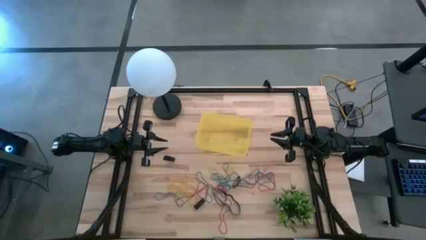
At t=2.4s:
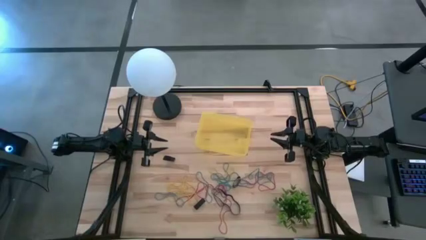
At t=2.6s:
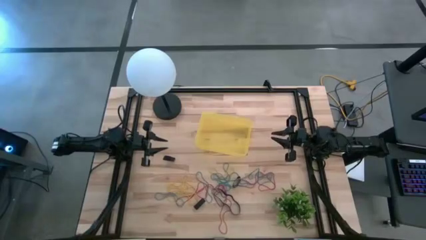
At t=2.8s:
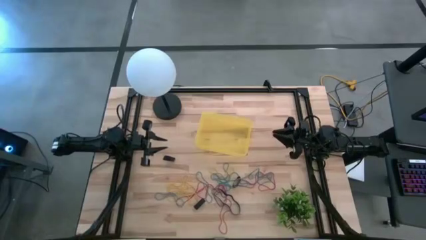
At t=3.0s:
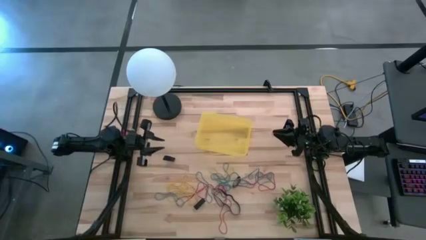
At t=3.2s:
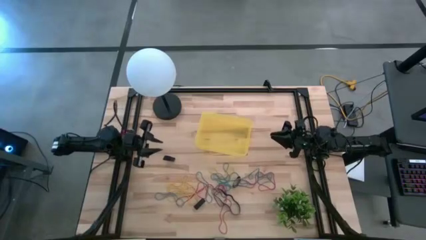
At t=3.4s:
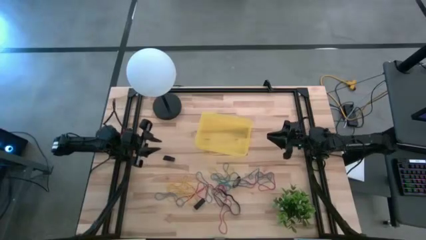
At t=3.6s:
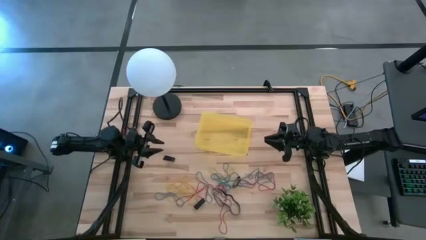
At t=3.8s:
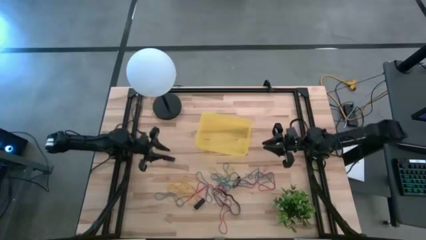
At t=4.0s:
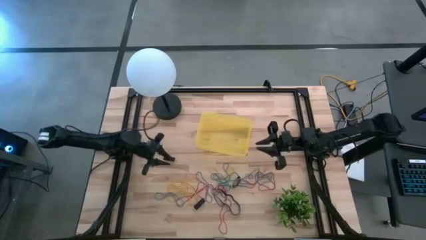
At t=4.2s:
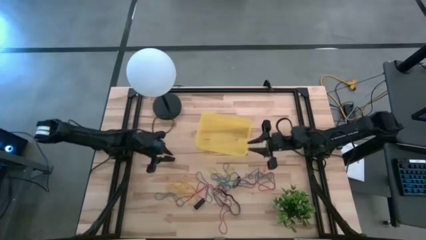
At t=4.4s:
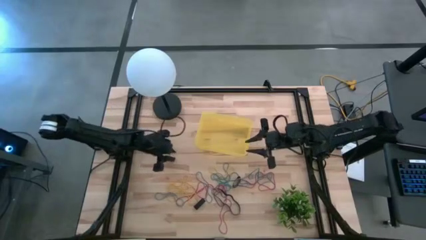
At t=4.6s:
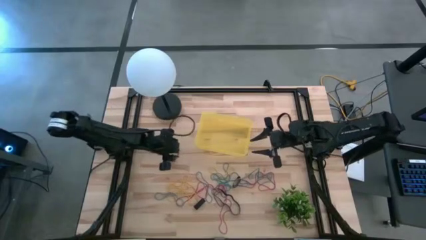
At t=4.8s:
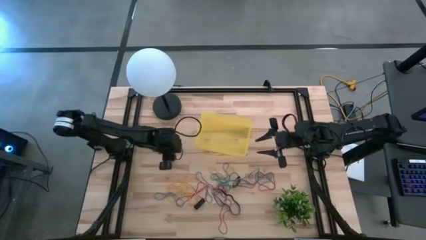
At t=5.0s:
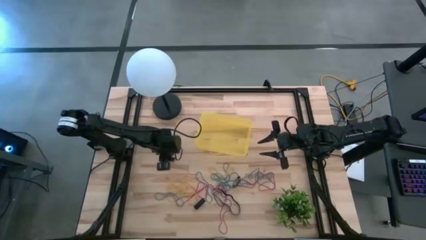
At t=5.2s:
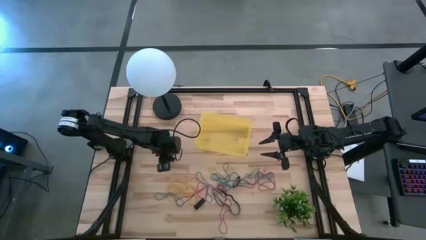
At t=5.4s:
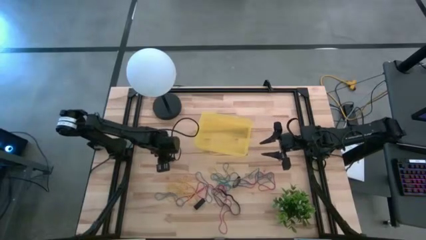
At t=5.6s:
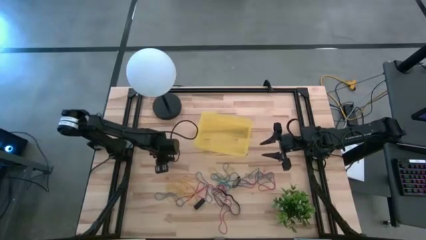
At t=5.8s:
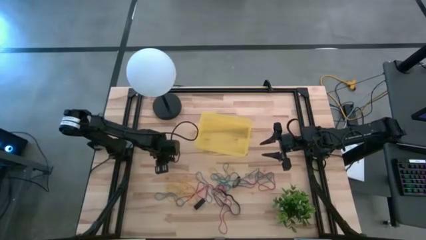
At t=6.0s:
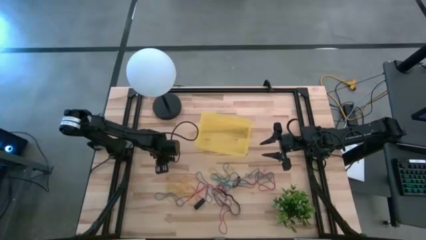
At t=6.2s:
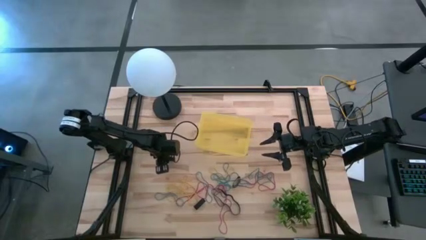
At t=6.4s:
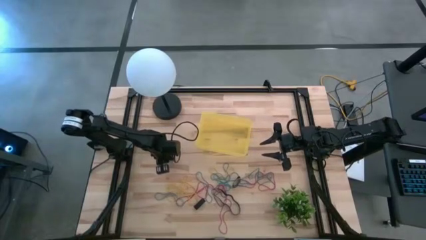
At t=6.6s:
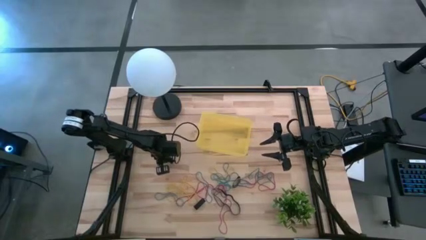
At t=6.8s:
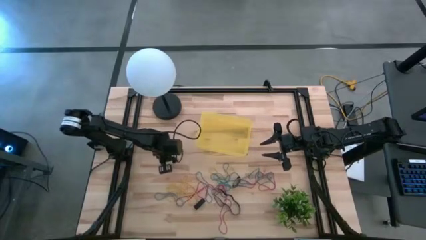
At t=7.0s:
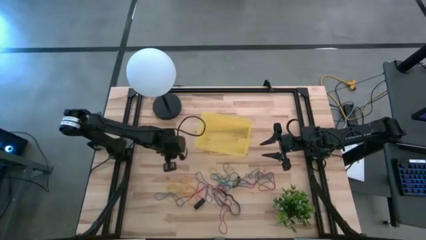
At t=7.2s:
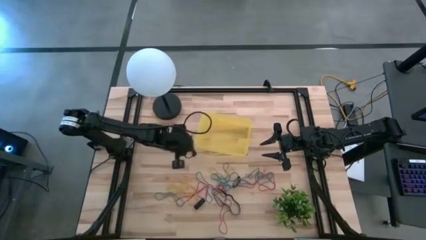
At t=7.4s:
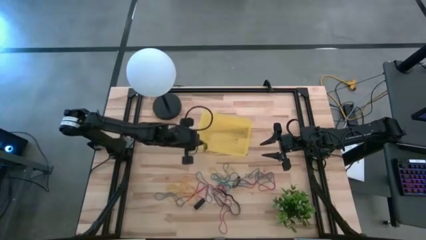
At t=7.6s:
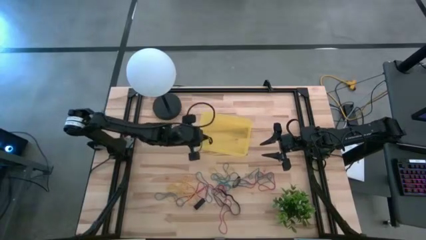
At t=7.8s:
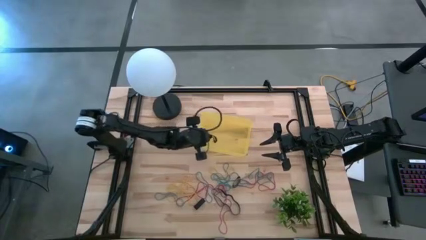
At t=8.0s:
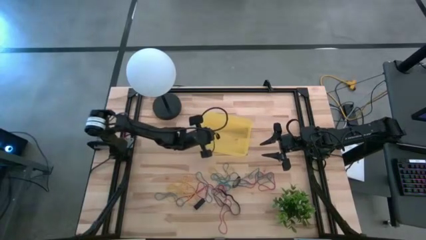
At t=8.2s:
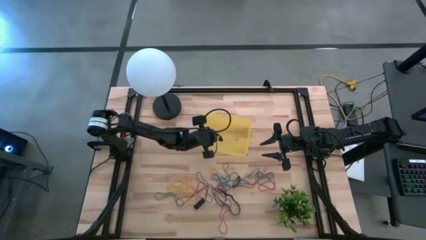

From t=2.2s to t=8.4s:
Task: Pick and place rubber bands into bin
Put the black rubber band into the yellow bin

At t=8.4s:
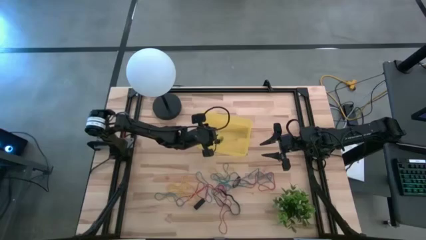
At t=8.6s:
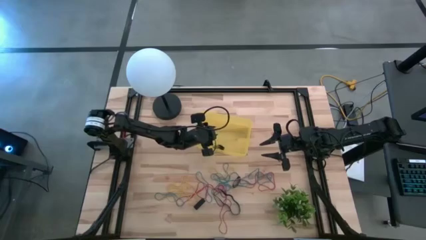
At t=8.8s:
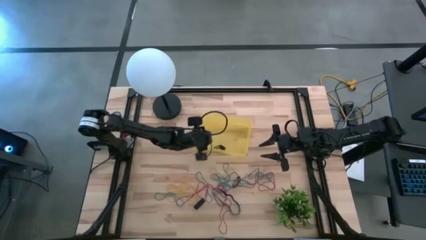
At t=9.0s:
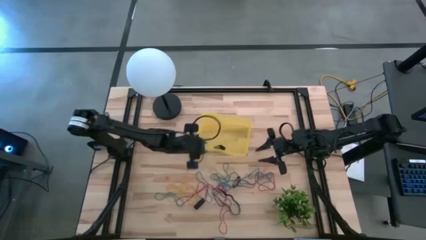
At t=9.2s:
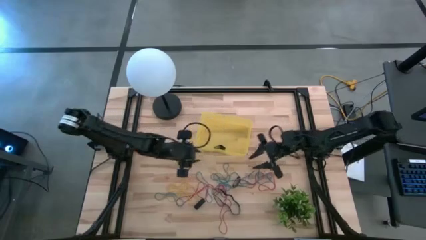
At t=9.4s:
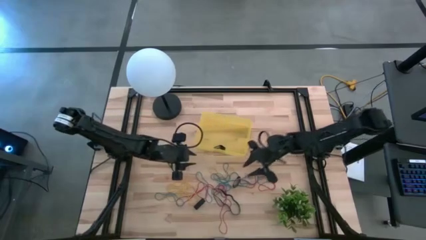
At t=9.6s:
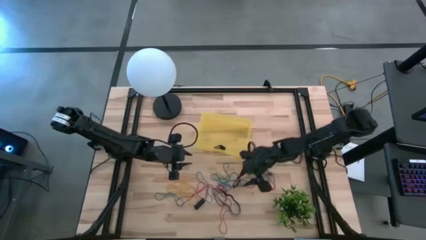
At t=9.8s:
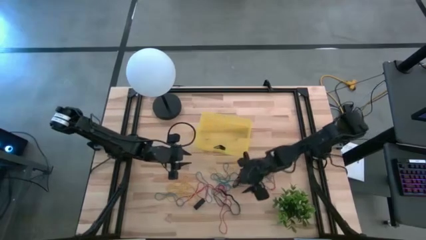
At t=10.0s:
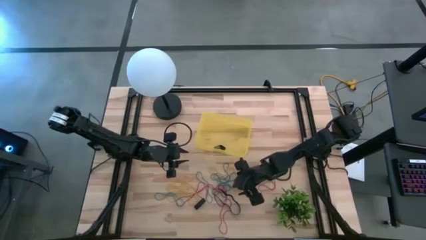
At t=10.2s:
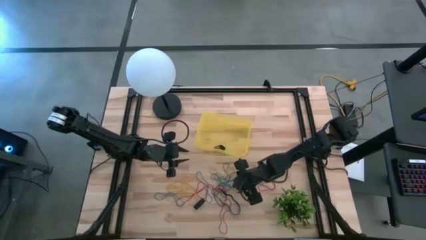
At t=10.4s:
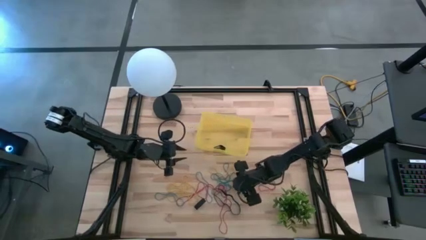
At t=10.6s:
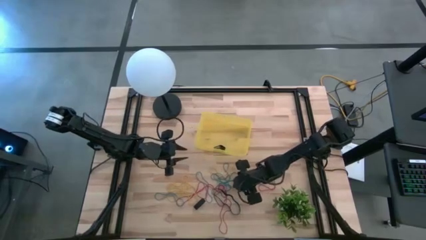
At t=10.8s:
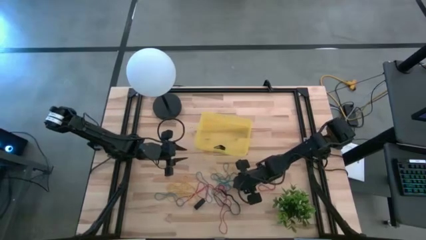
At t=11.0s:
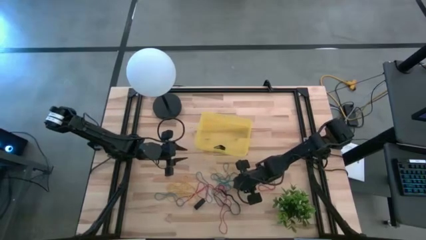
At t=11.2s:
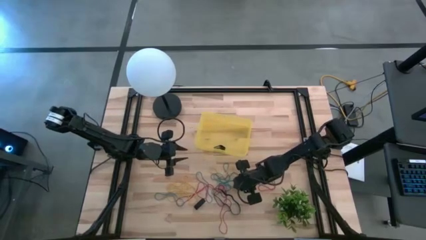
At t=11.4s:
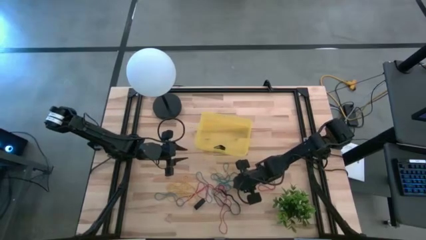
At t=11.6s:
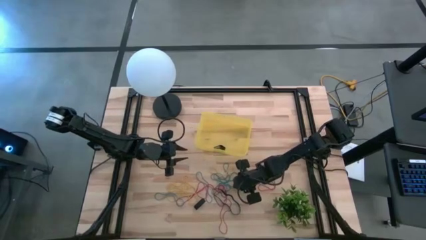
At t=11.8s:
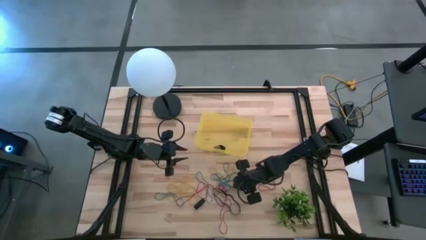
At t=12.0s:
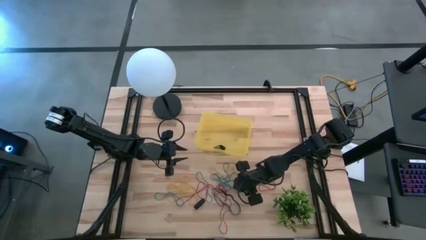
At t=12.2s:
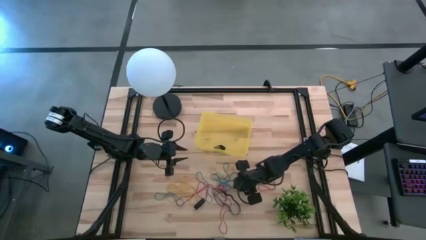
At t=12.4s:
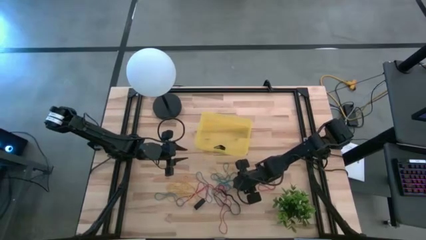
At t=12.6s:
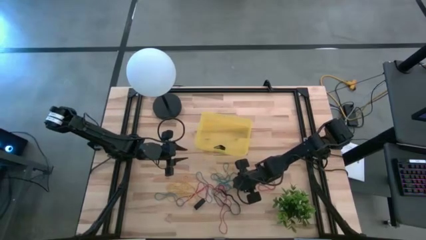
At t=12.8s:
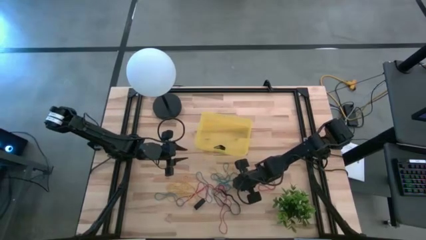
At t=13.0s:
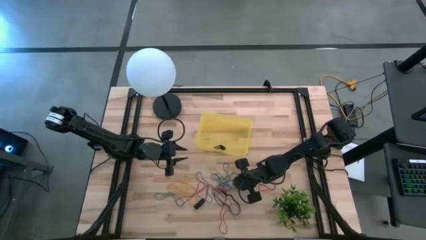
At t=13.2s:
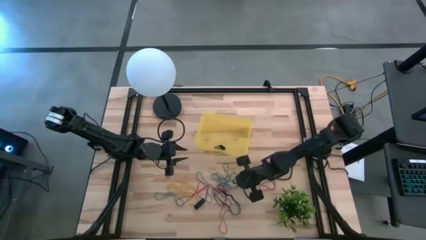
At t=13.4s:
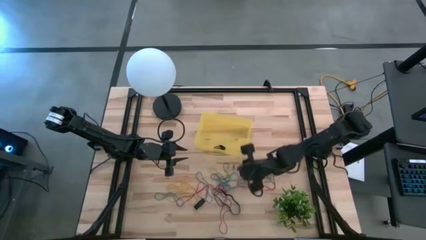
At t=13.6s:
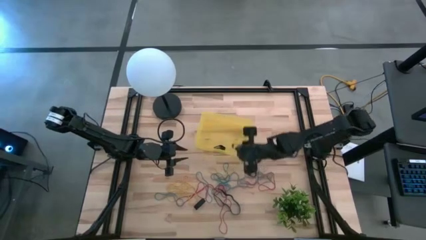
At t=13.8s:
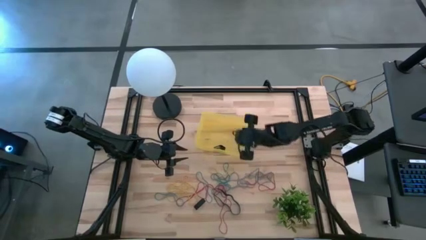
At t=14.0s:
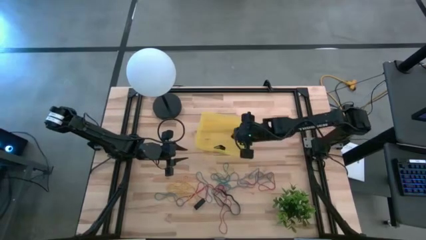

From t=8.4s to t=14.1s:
Put the black rubber band into the yellow bin

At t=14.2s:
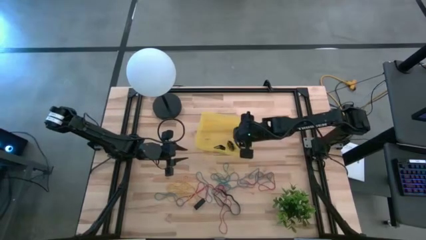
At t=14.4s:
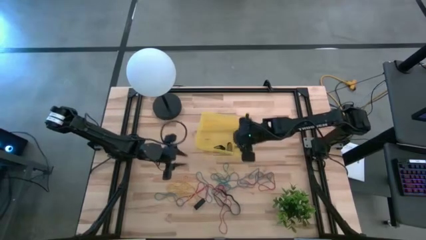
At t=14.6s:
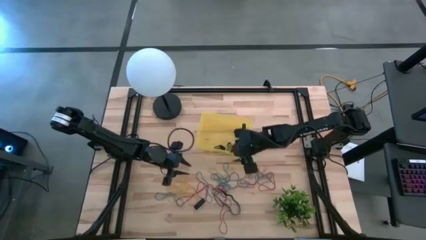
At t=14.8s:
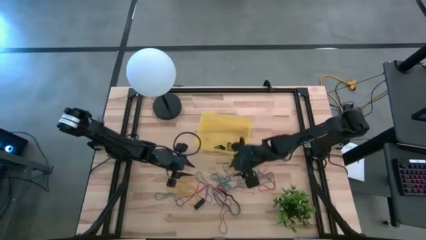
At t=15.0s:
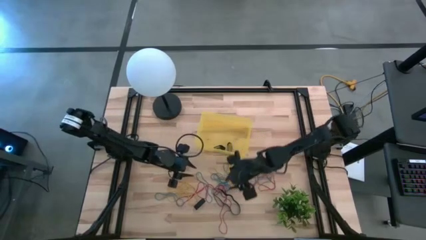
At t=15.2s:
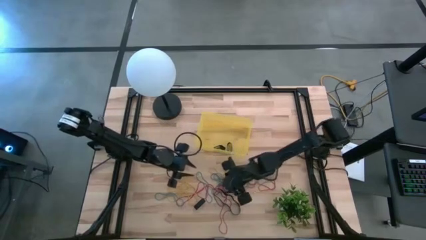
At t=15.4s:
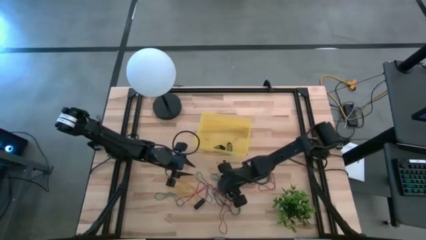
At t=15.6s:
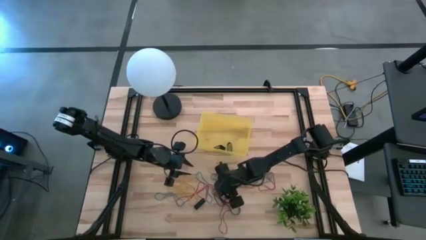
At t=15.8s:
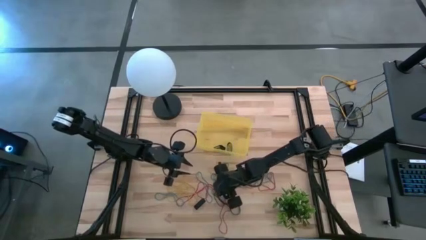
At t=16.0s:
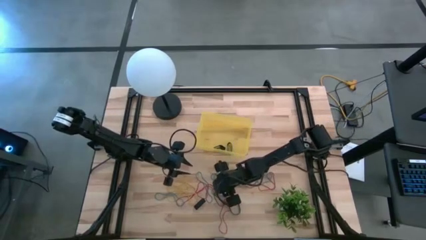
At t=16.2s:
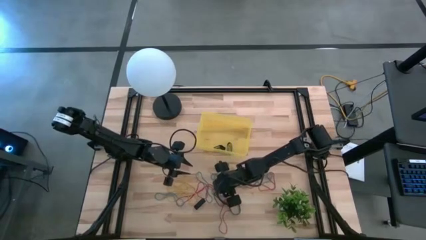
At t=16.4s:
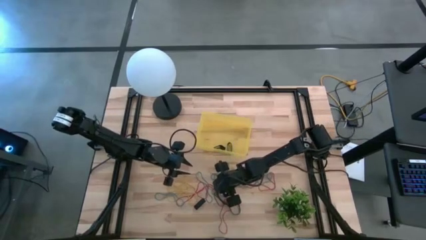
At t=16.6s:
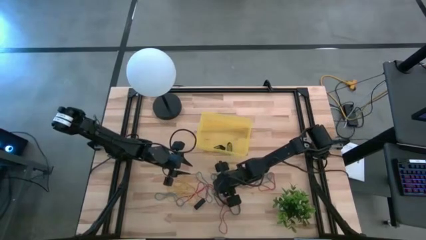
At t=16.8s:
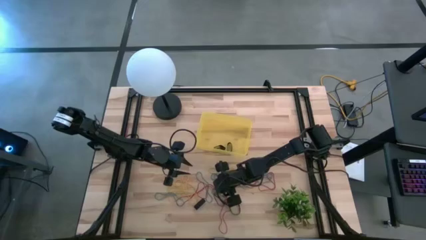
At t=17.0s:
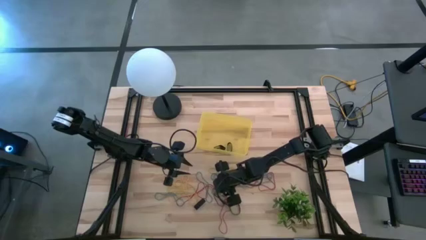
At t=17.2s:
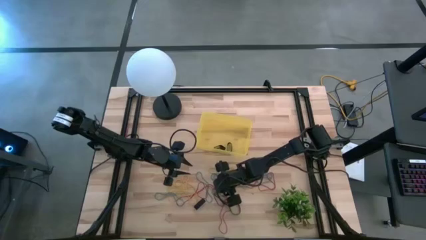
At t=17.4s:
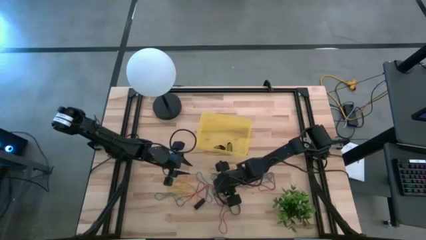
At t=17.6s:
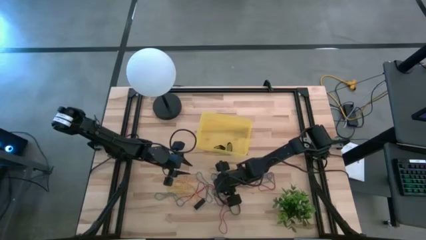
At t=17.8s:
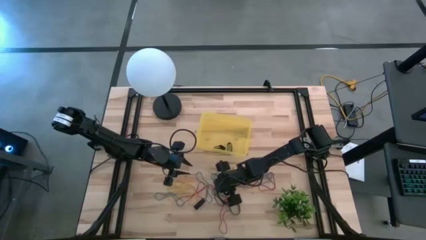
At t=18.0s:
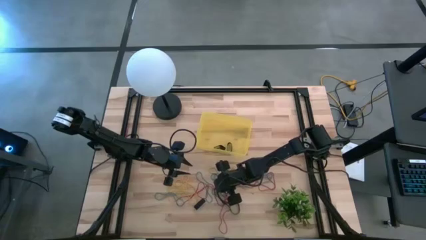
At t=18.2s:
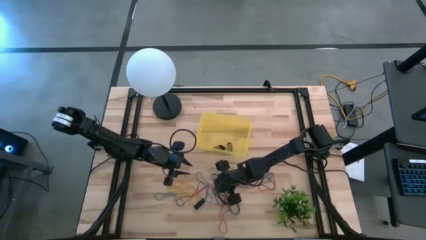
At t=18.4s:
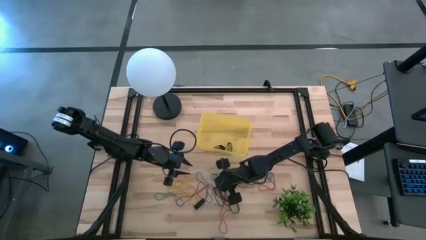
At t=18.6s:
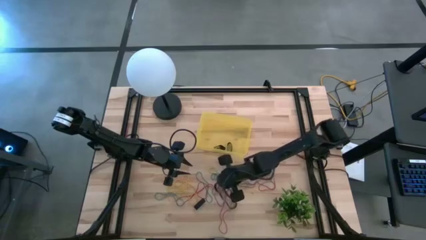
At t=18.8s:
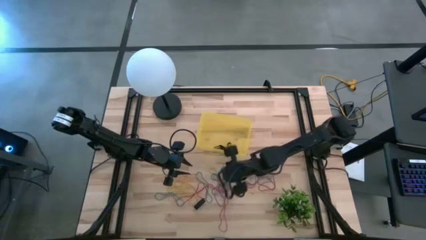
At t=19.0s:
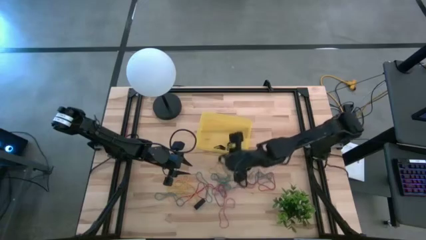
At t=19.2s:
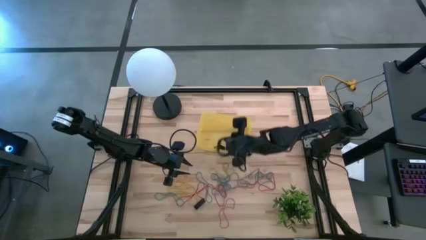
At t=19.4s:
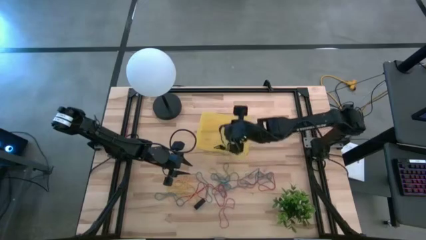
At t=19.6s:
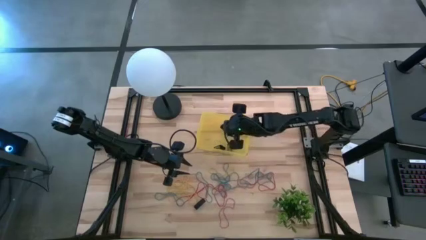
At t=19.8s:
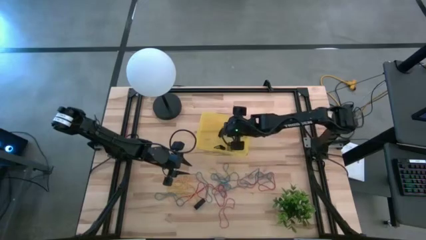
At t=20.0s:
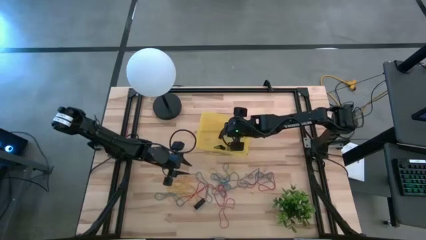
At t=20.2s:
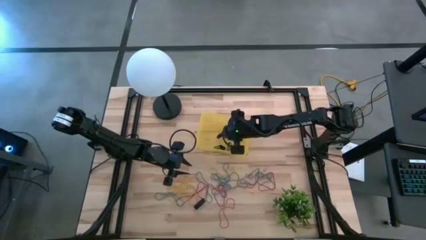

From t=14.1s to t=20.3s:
Put the black rubber band into the yellow bin
